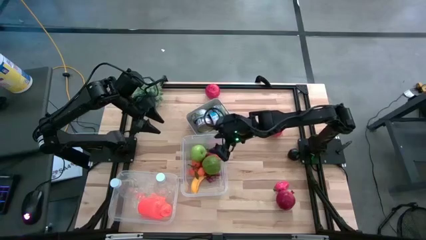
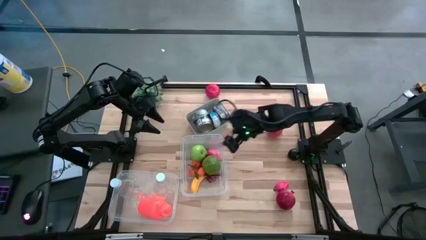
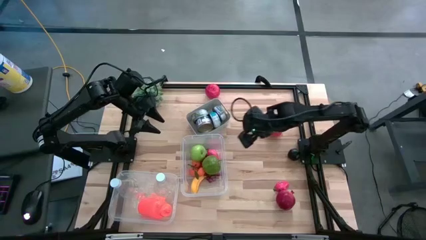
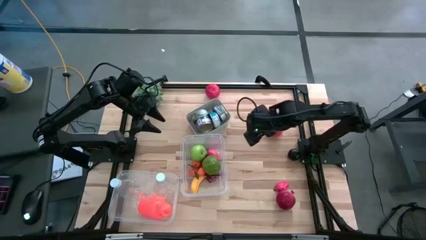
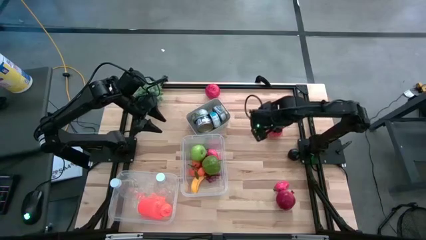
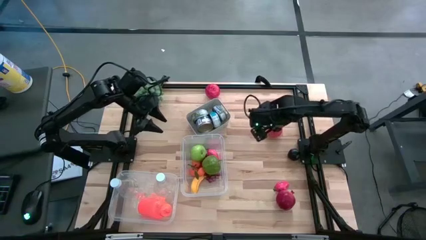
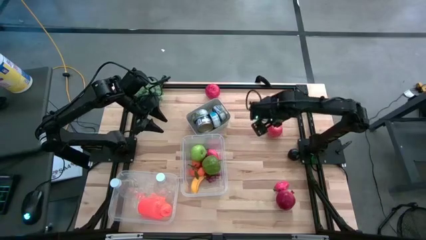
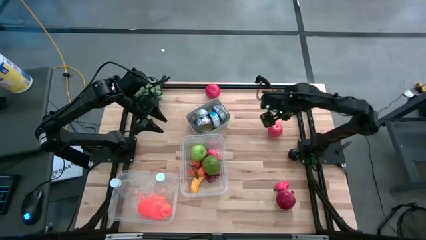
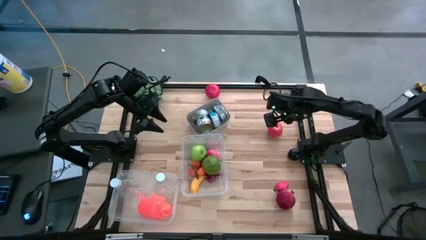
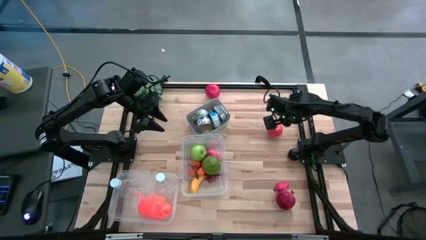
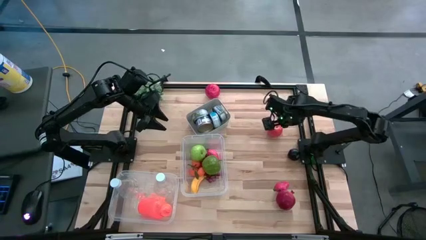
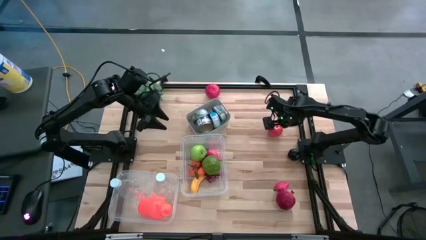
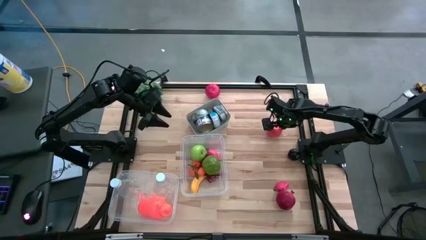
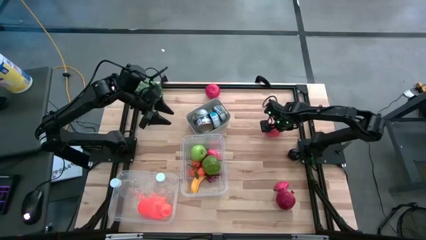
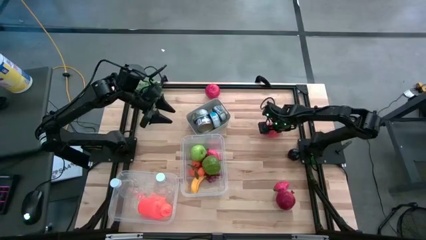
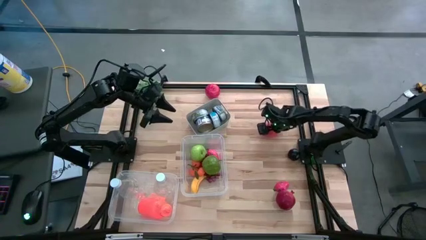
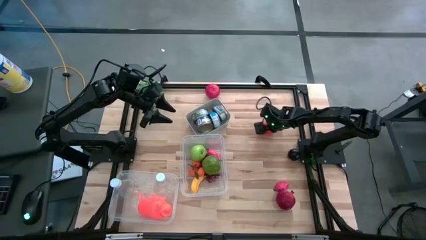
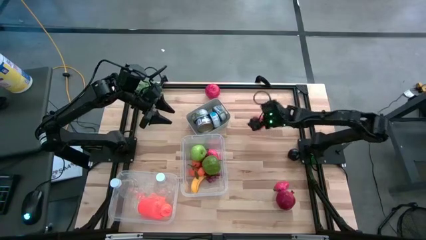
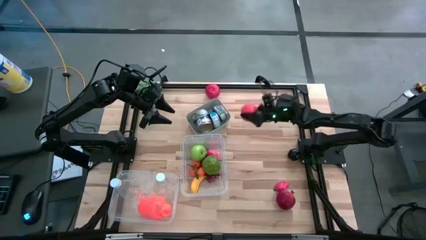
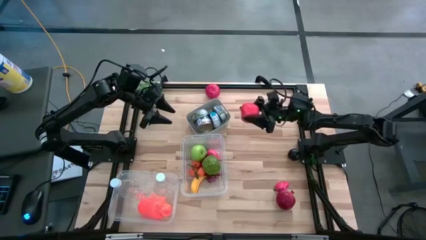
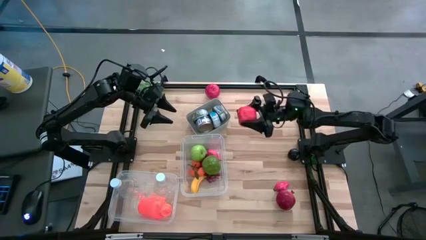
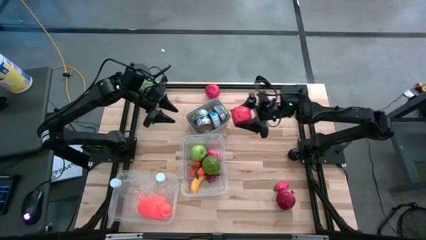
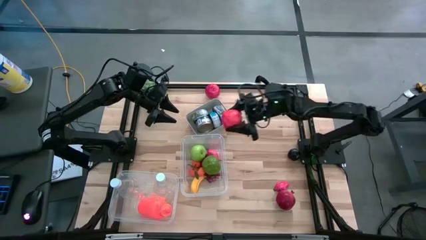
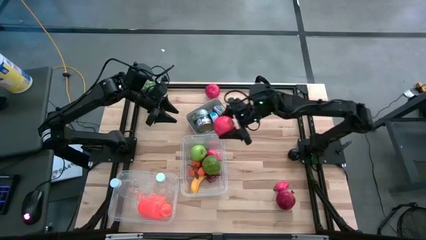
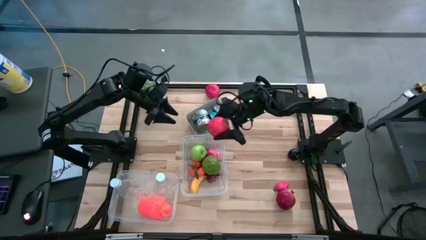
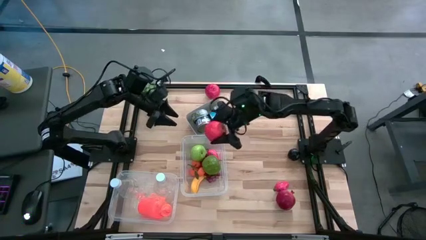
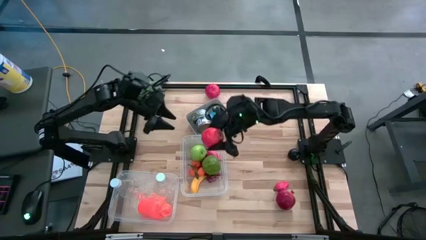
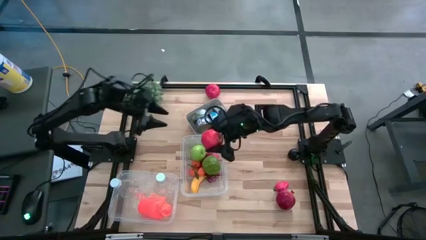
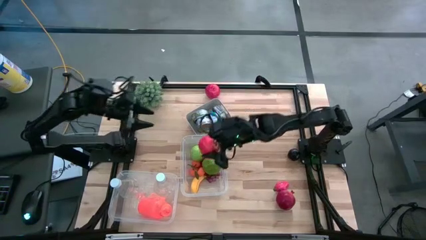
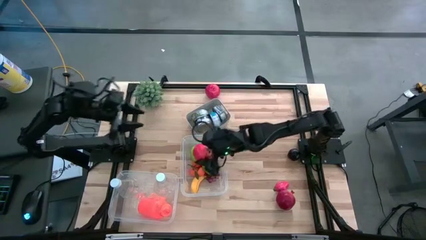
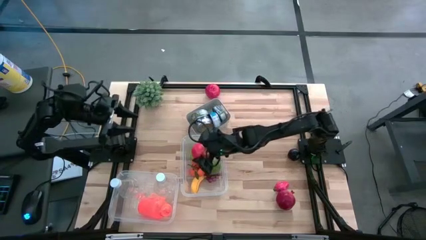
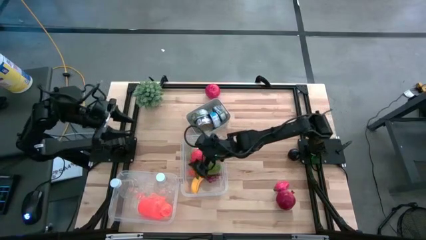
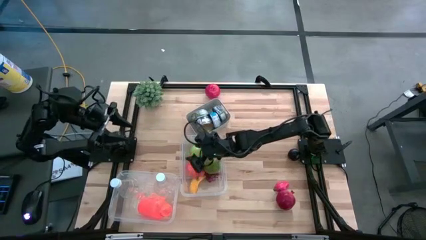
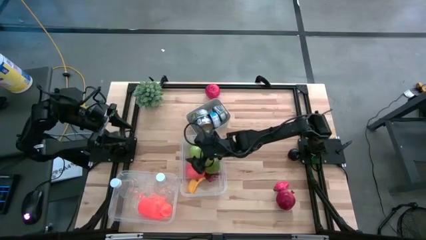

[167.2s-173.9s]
Task: Pick & Place Food Item
Put the bottom red apple into the right transparent bin

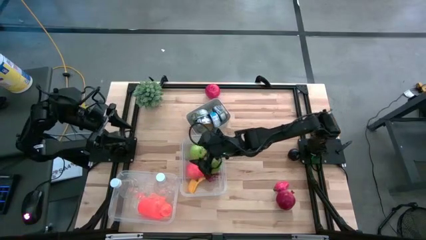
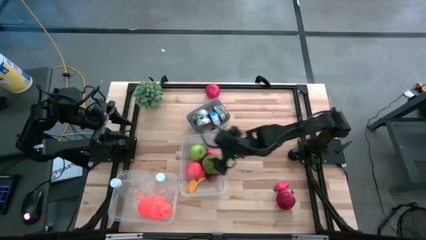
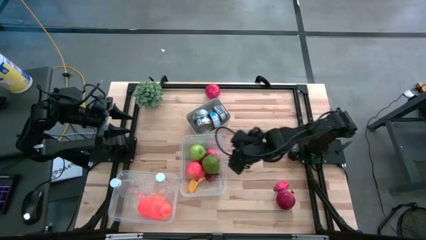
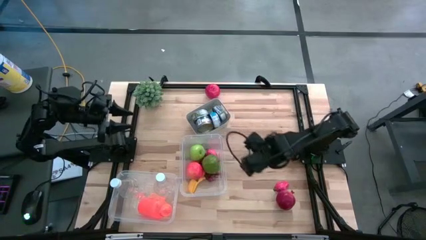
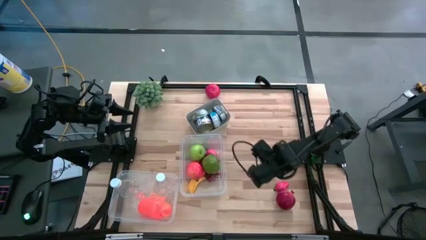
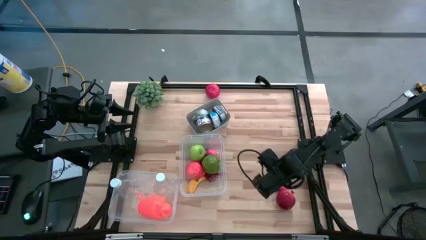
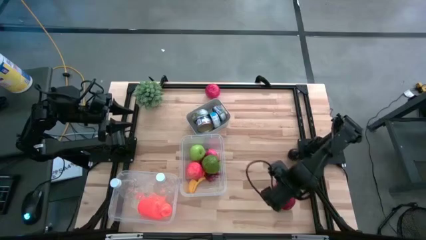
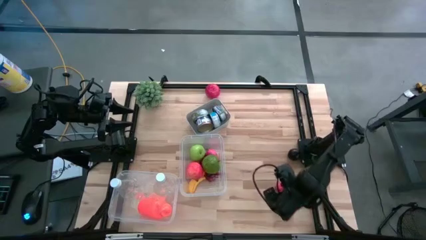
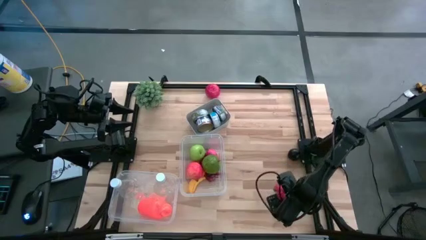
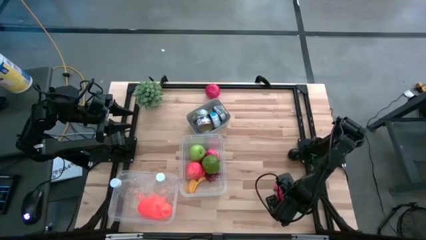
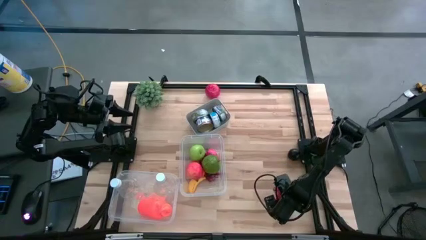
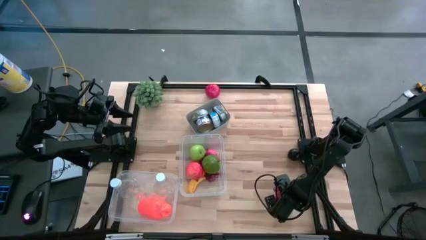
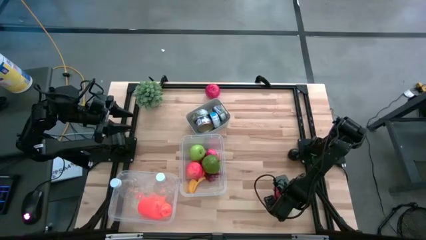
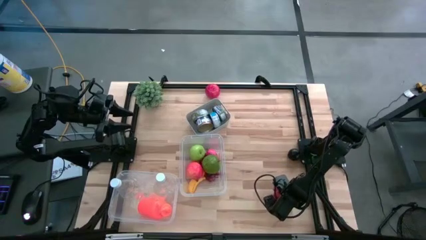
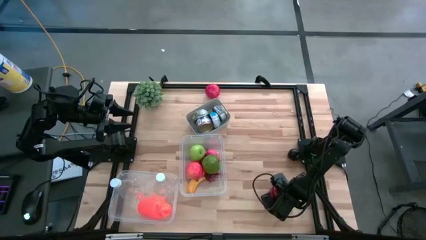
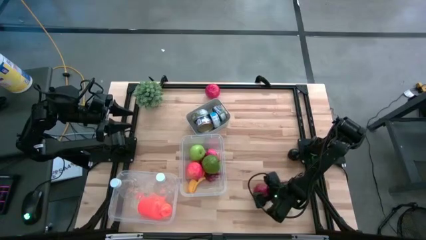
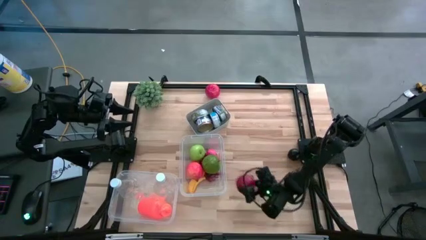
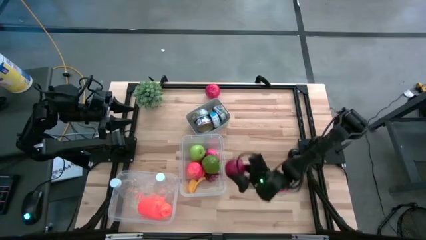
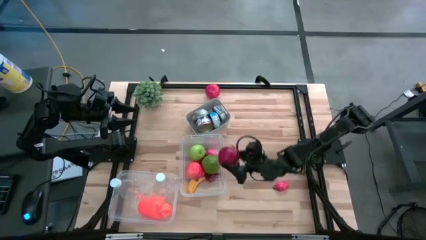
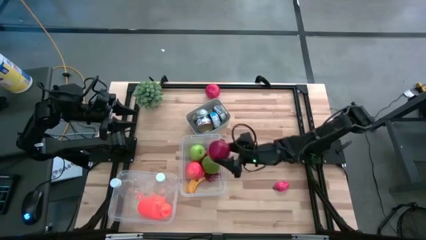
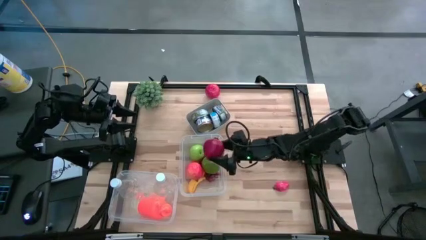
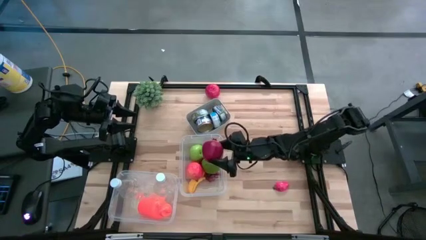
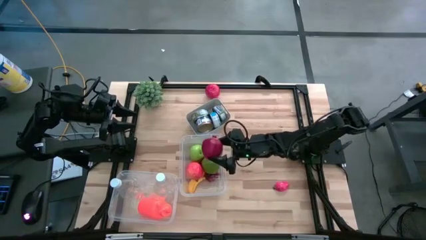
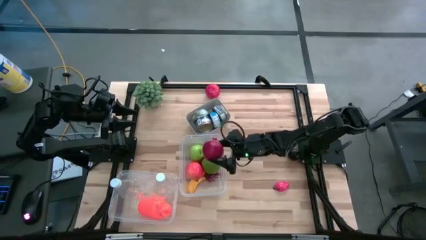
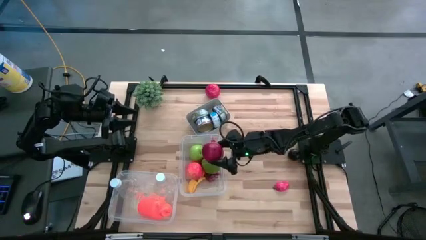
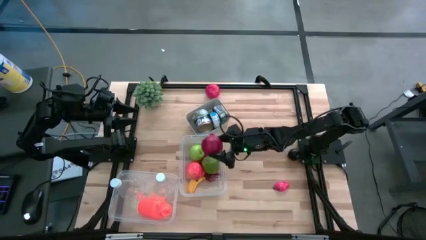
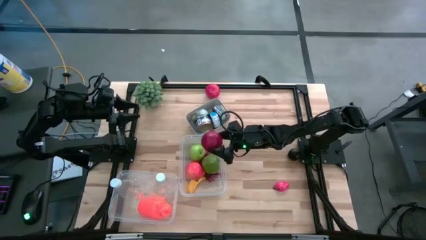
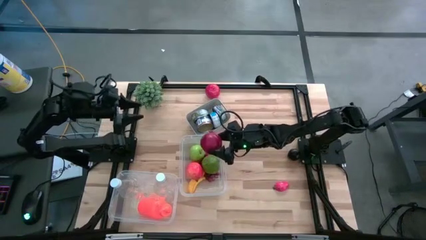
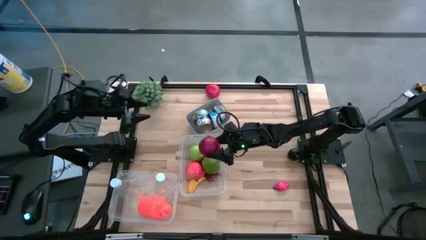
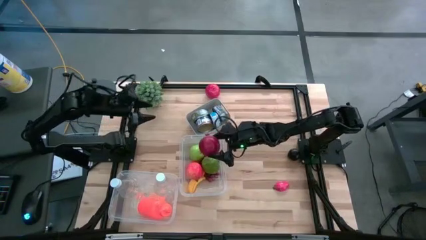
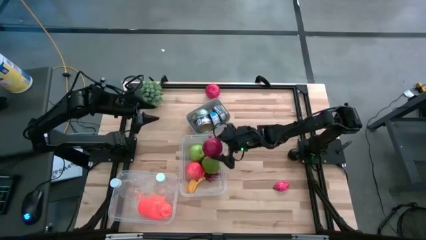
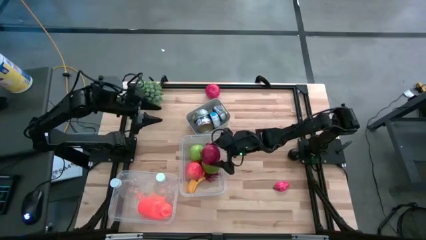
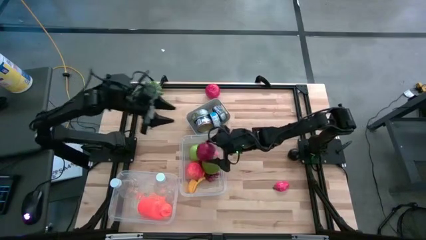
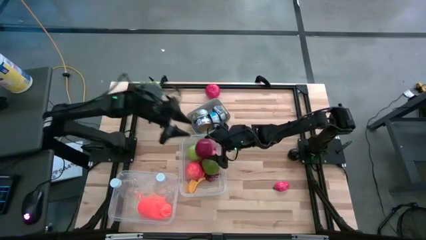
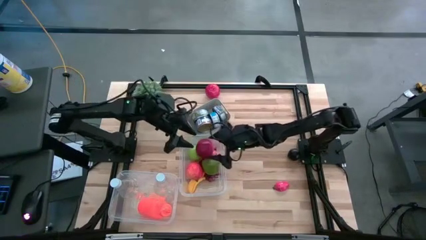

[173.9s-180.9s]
Put the pomegranate into the right transparent bin

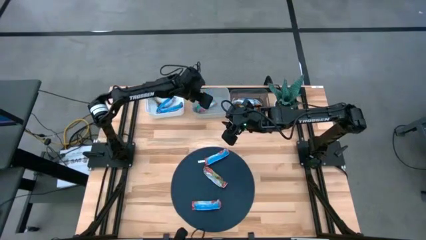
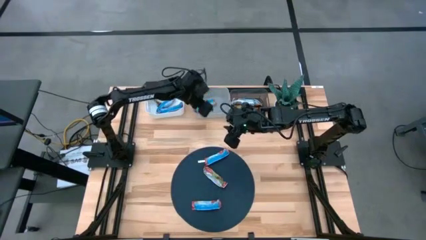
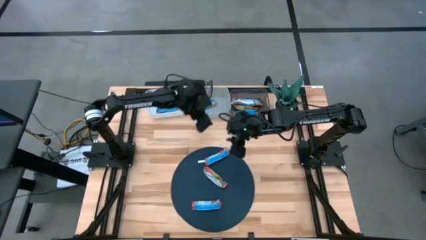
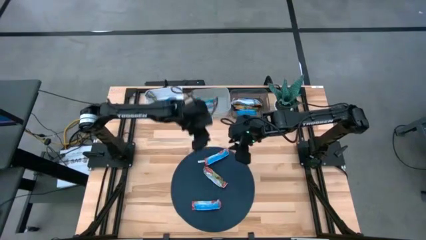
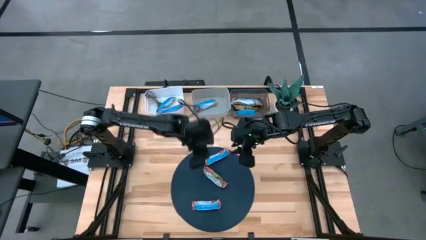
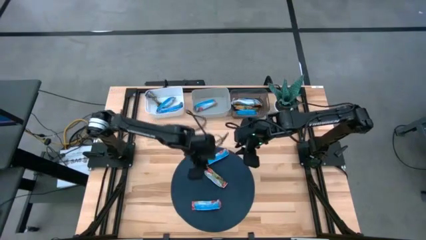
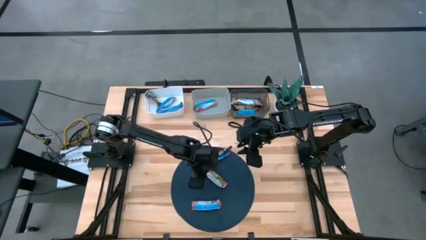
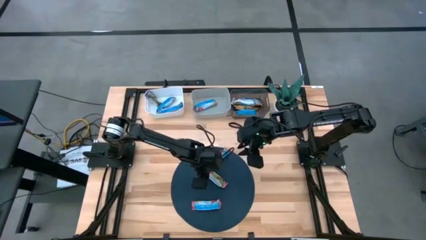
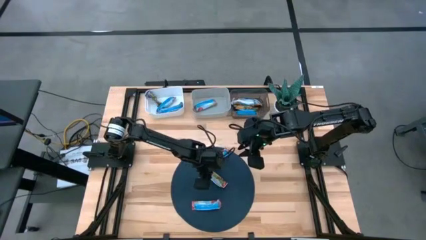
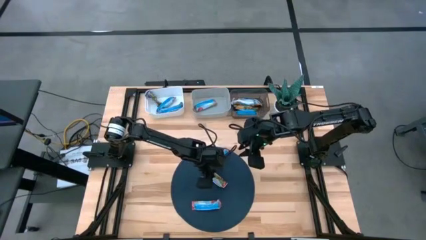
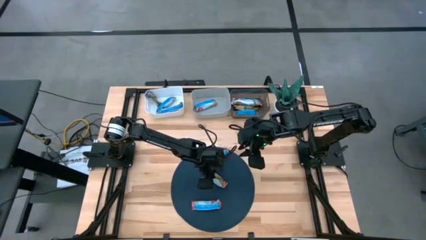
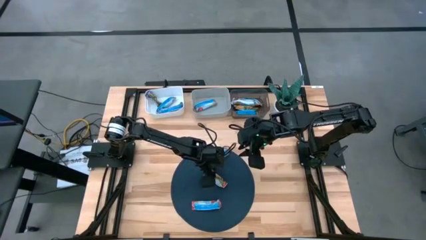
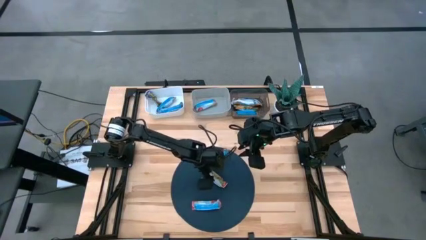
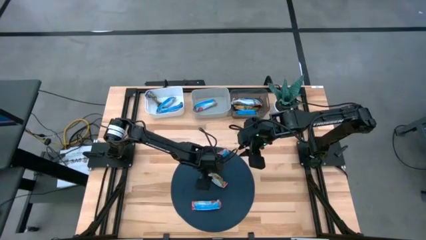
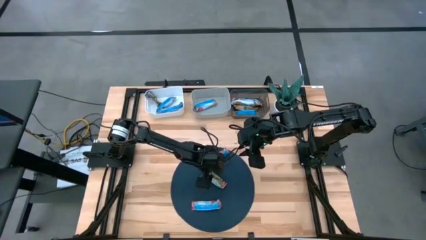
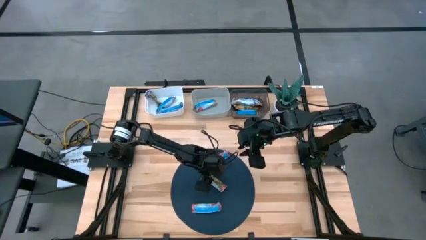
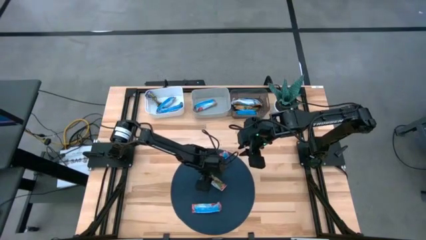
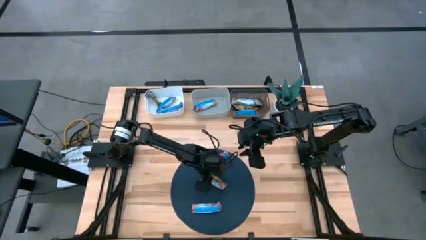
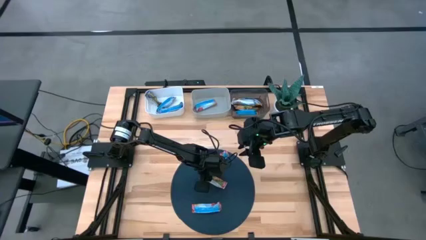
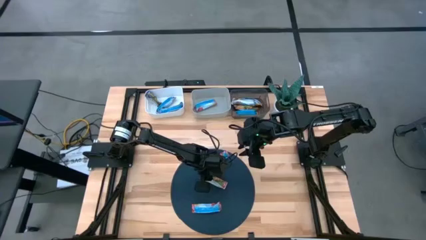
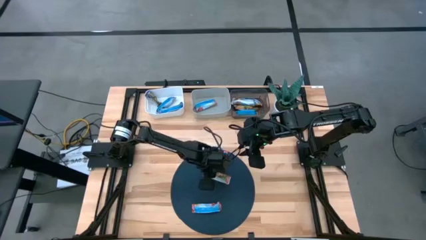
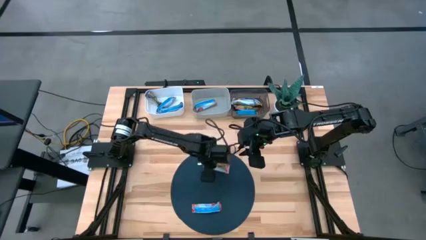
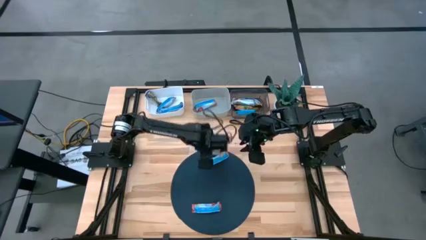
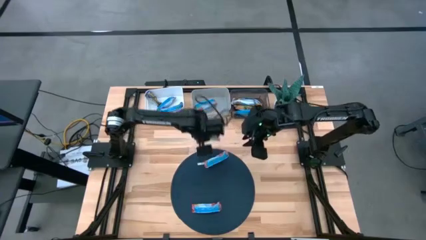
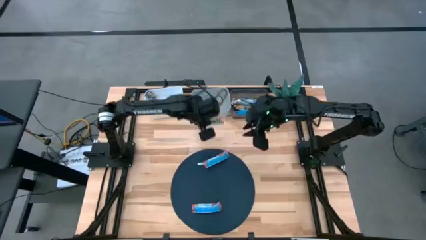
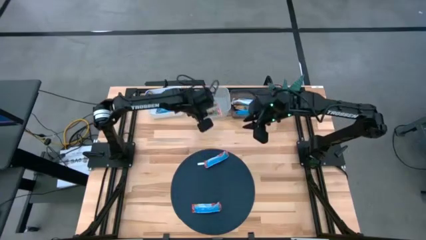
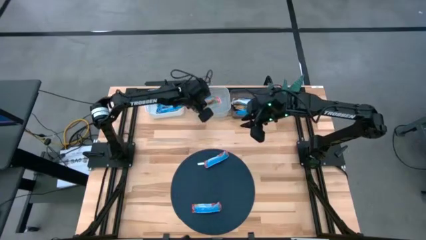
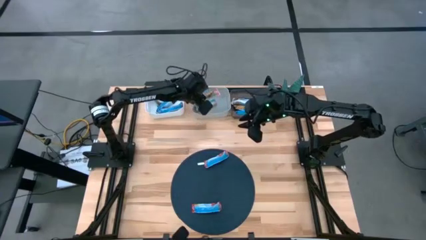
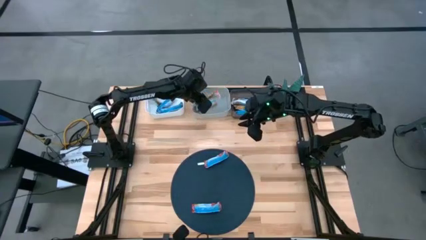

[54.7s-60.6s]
Task: Pick and place Granola Bars by type
Put the red granola bar into the gray bin
